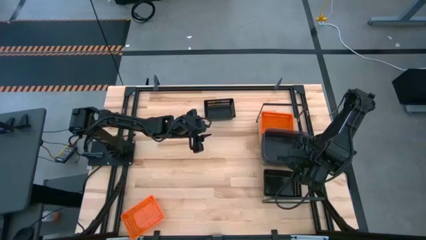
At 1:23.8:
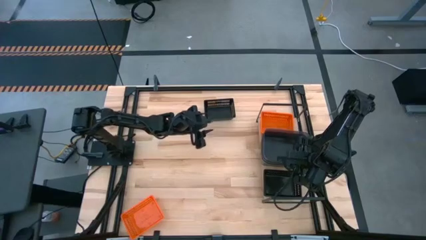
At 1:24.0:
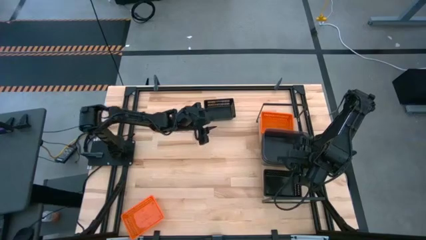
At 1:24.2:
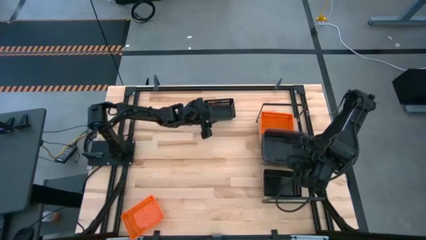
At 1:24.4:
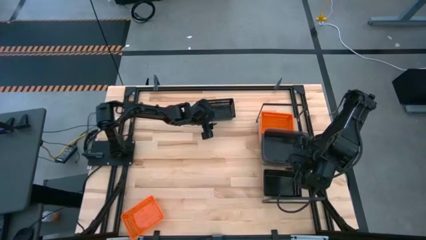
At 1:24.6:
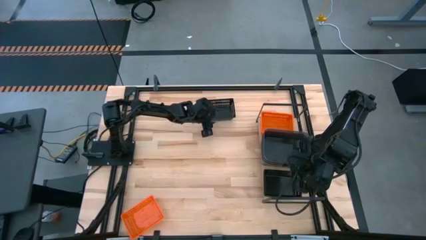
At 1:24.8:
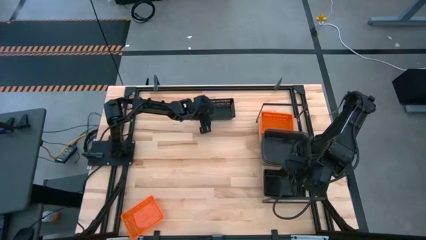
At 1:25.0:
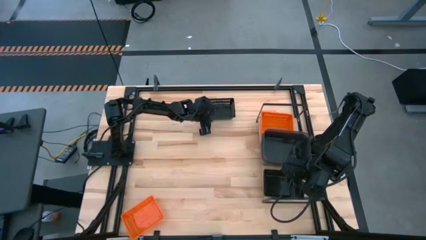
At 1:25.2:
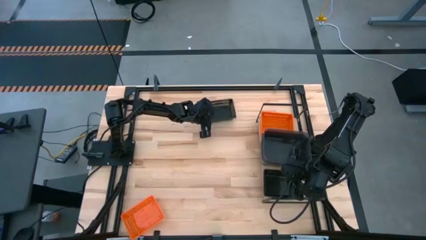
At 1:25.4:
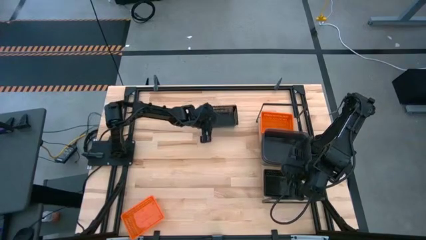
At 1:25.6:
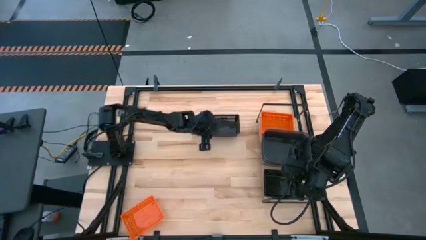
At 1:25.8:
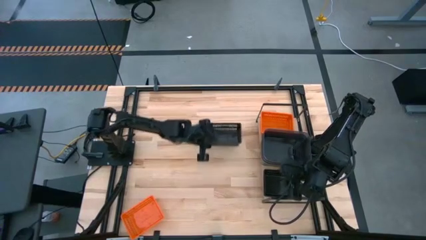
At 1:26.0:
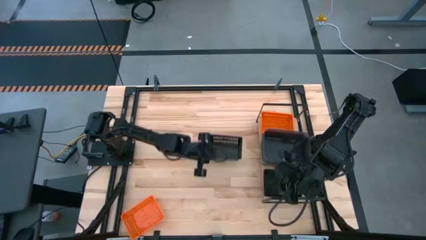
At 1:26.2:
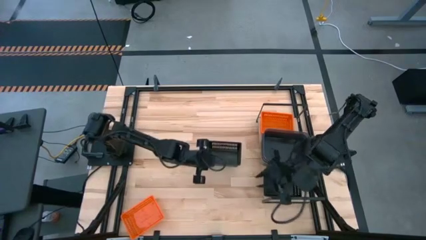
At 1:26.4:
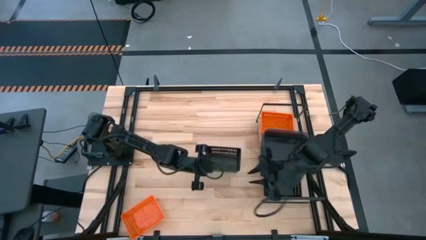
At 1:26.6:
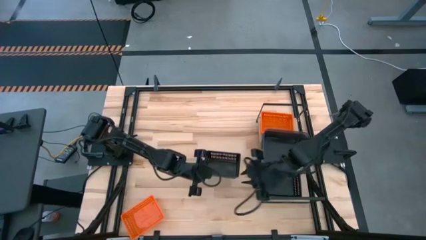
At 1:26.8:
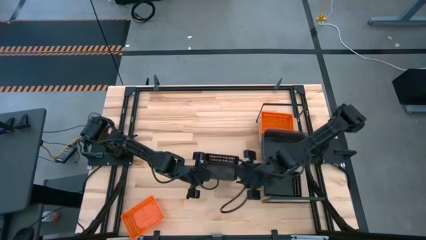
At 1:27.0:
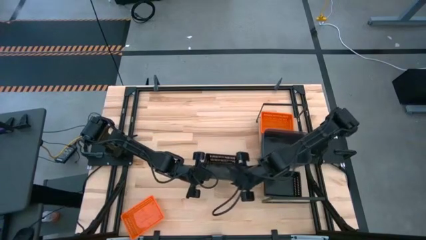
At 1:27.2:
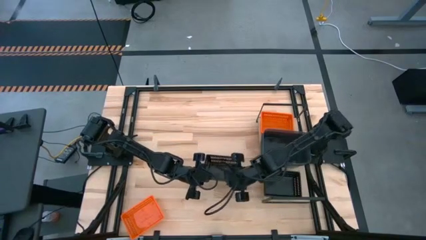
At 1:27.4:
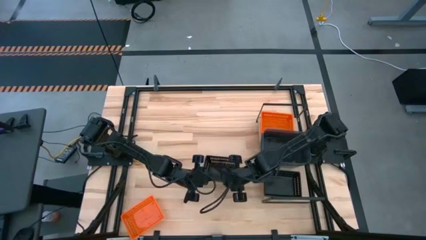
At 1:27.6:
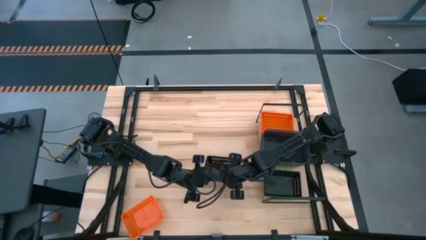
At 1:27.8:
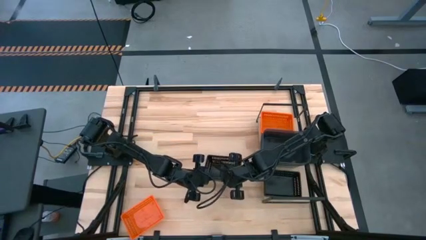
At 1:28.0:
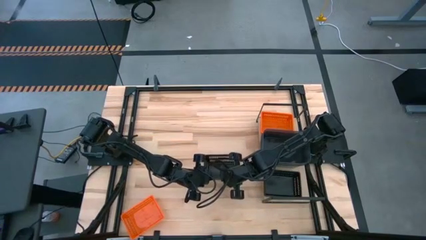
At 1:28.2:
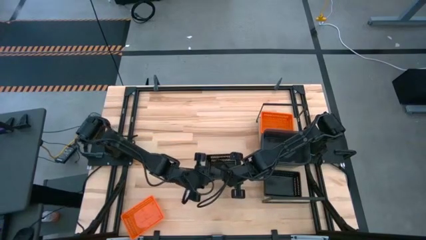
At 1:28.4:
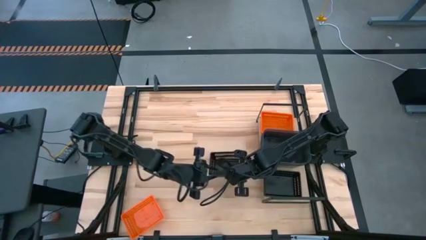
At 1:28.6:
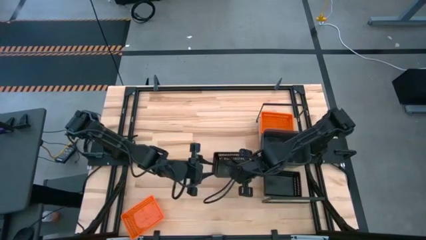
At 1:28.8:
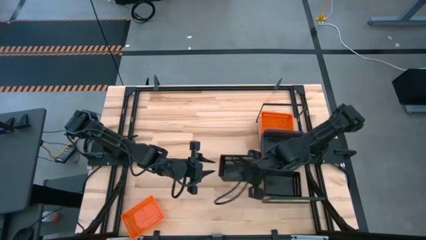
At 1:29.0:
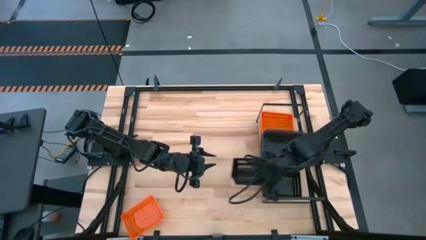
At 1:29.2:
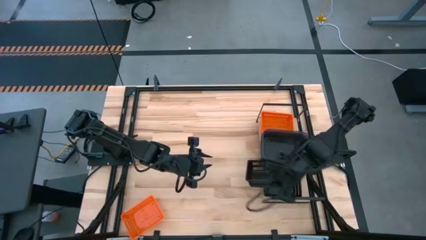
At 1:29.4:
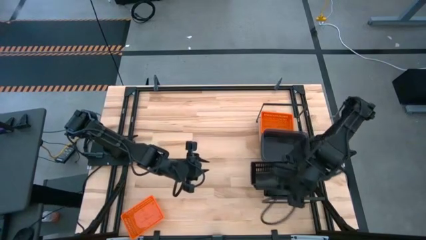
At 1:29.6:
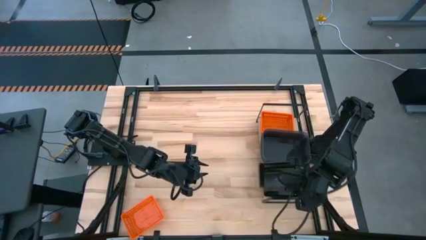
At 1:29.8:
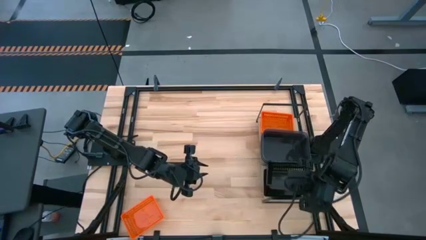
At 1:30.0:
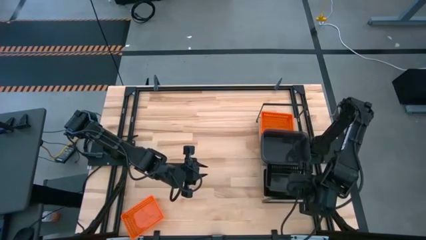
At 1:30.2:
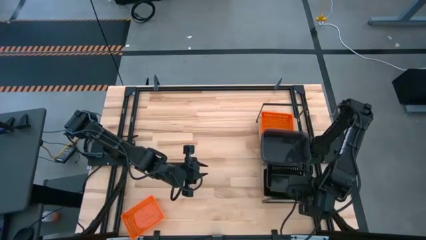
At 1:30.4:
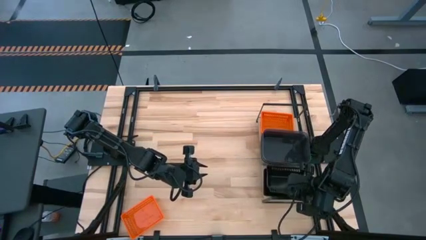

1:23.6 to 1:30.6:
Task: Stack baskets on shelf by color
Stack the black bin on top of the black bin on the shelf

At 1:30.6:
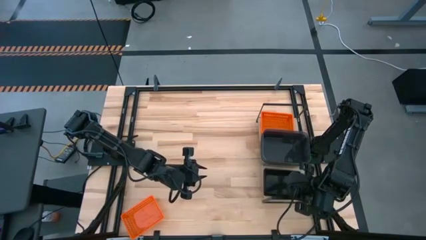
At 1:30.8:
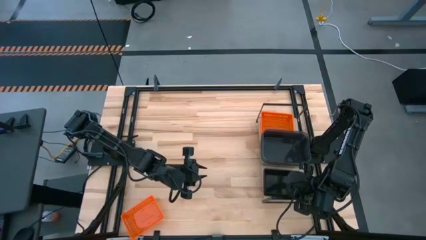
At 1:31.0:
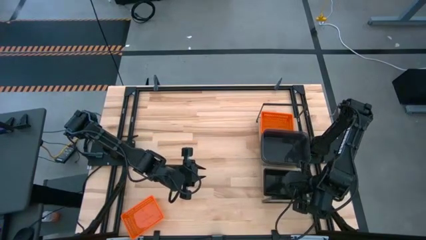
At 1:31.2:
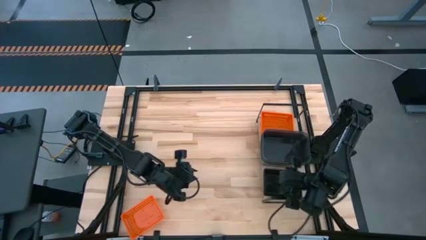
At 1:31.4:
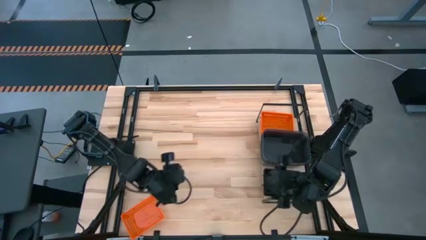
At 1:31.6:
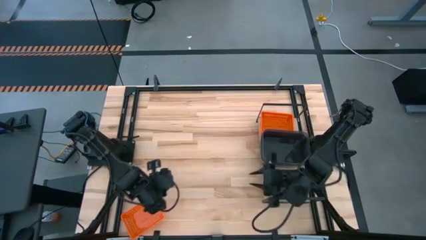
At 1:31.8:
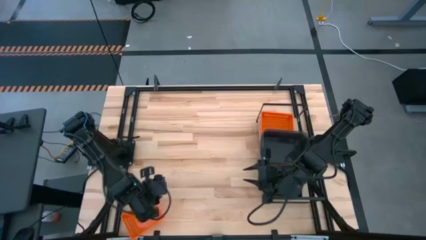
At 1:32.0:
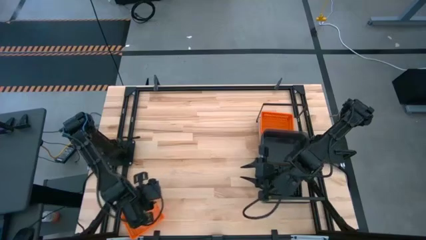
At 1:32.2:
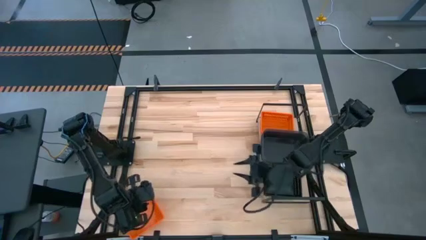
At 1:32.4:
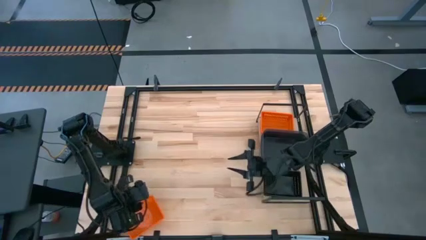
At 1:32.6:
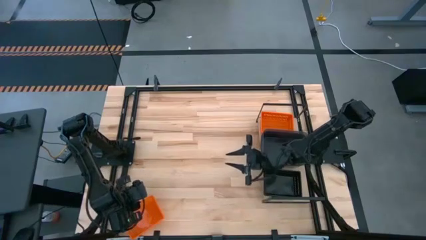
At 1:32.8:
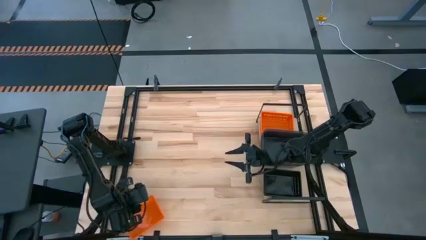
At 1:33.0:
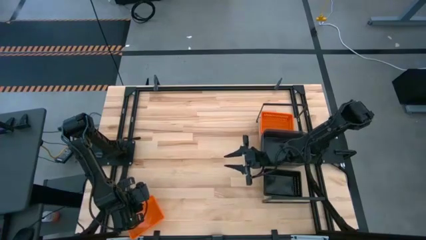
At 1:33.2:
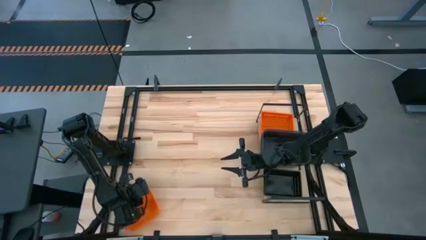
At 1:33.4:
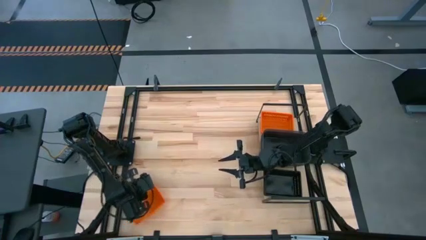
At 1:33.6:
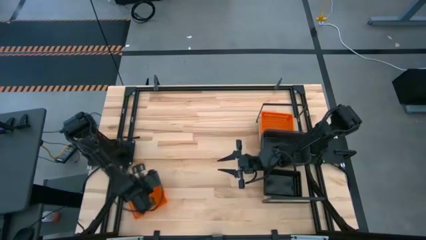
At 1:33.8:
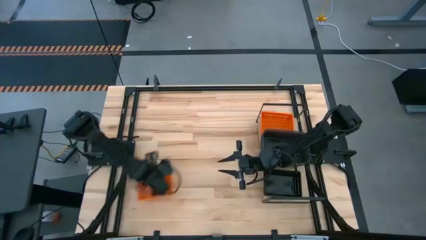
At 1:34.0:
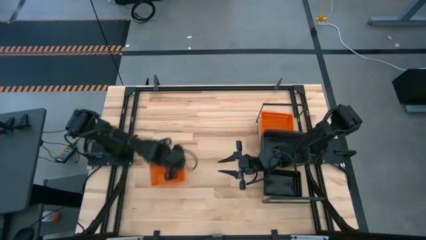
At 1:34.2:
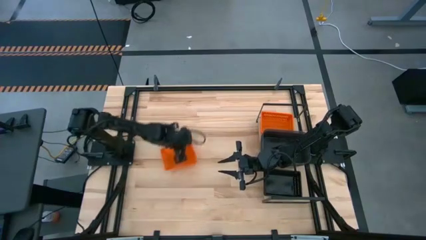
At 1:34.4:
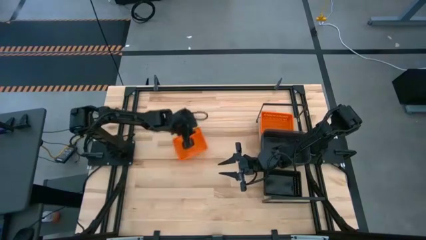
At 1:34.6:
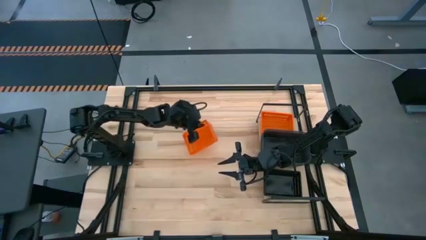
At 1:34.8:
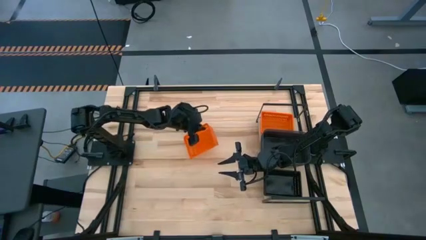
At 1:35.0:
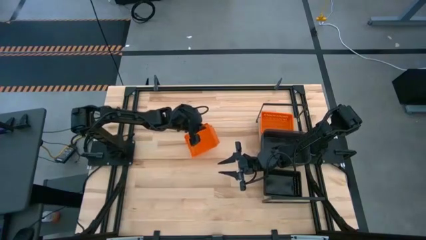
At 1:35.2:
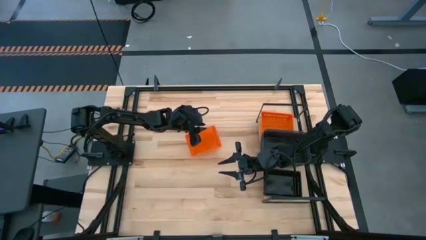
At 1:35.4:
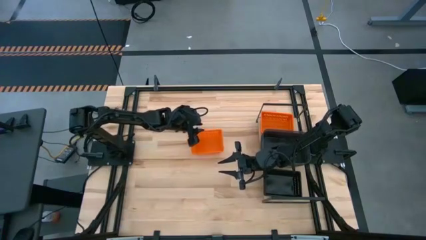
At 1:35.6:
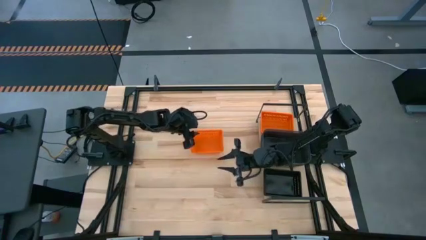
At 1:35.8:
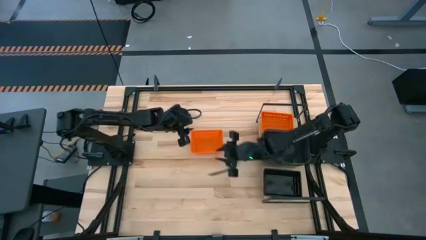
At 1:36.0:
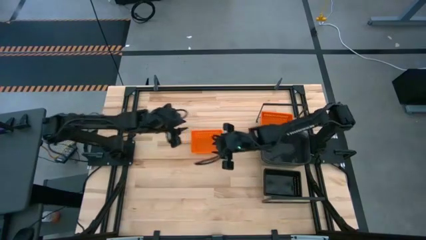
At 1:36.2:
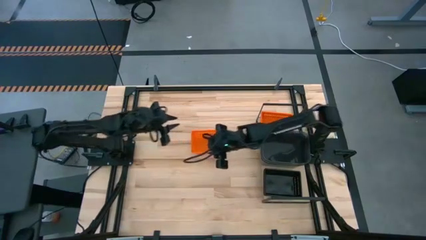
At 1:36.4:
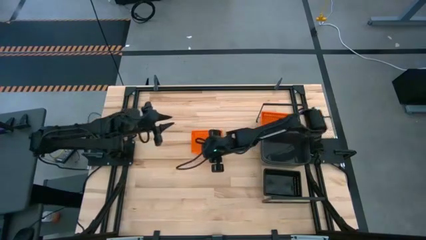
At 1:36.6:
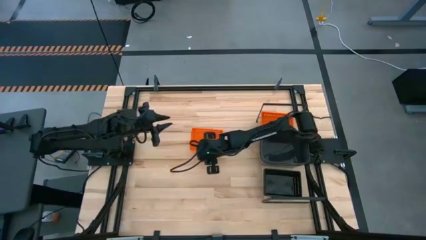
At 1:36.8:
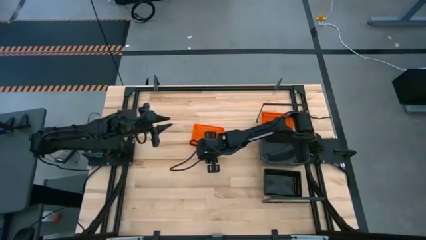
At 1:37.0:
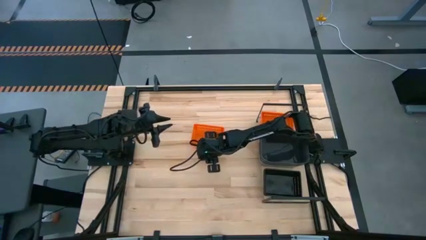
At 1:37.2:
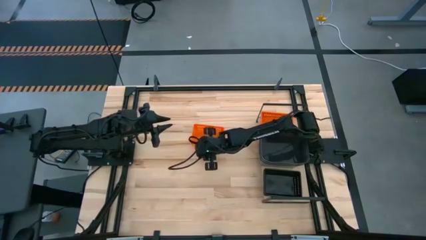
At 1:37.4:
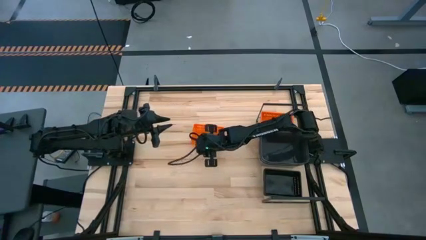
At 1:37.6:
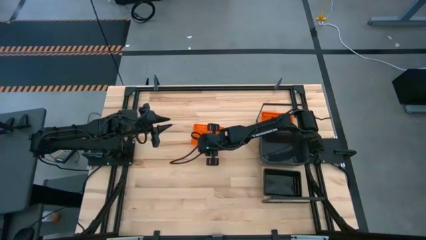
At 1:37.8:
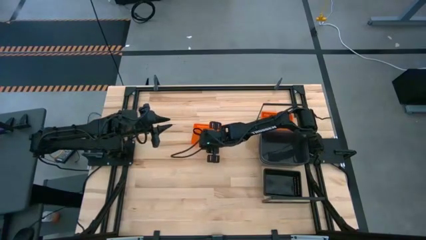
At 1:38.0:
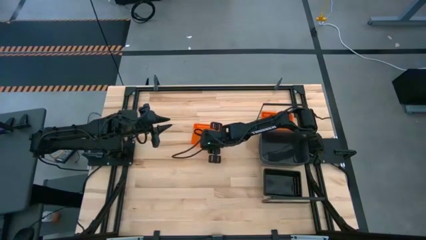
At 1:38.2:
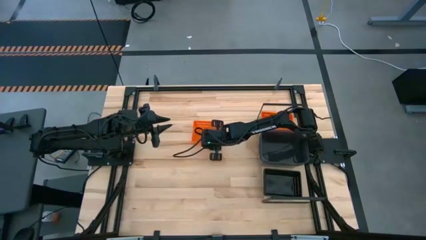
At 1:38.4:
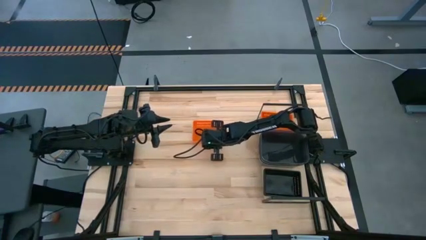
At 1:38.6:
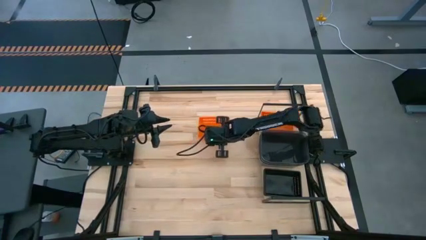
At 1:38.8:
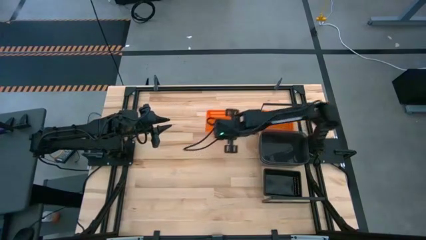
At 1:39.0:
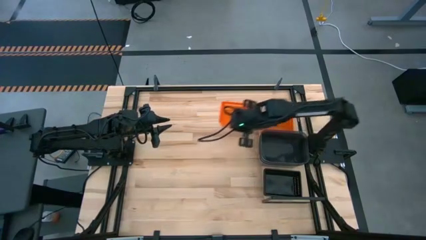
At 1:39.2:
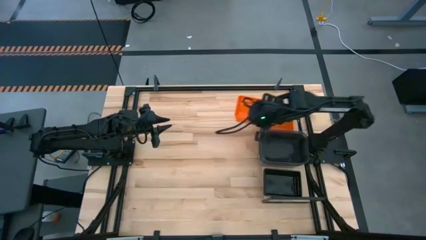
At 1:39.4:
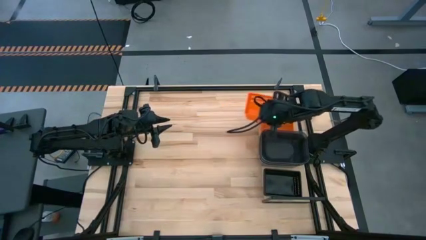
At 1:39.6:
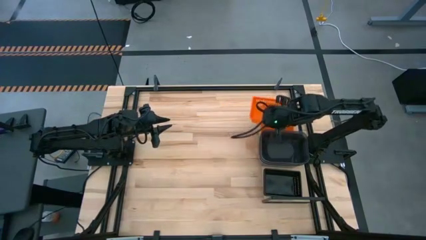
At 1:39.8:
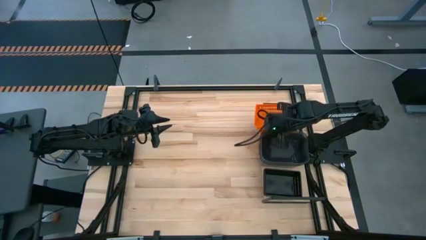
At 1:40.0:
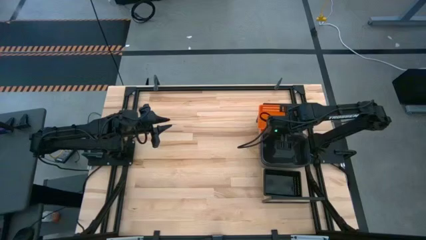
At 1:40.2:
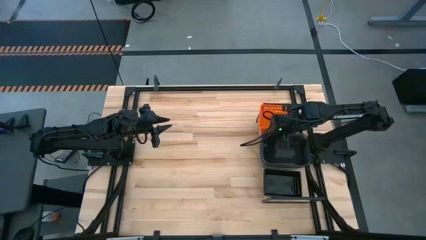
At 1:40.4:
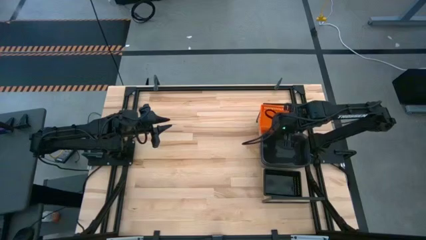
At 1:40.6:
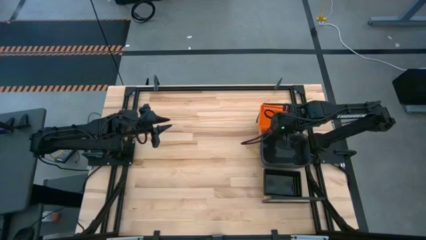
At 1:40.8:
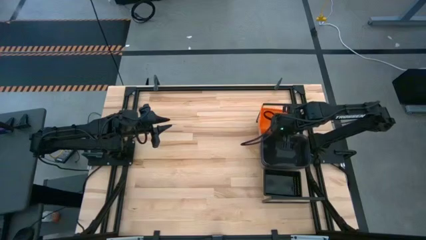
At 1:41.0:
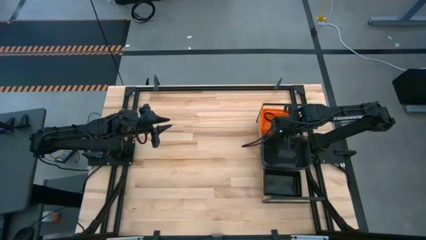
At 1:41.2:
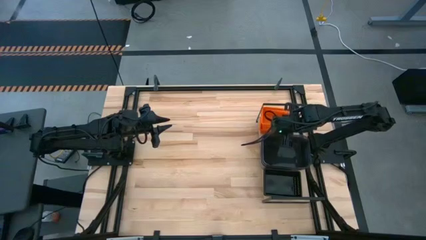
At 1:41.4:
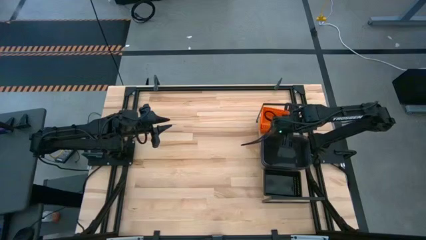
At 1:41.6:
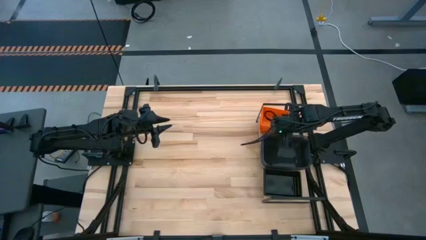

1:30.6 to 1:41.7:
Stack the orange bin on top of the orange bin on the shelf
